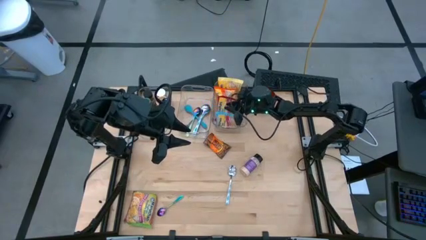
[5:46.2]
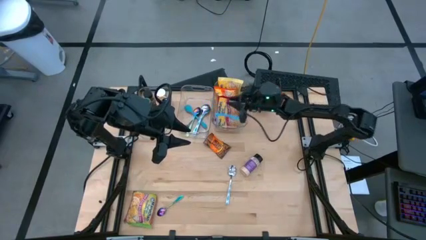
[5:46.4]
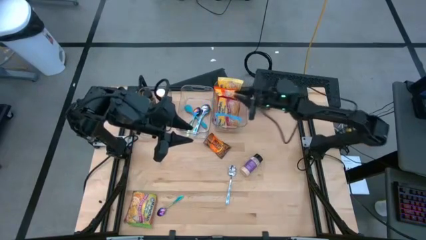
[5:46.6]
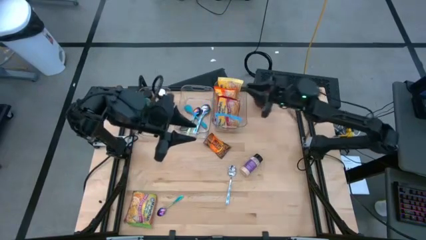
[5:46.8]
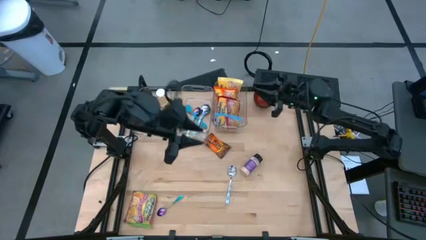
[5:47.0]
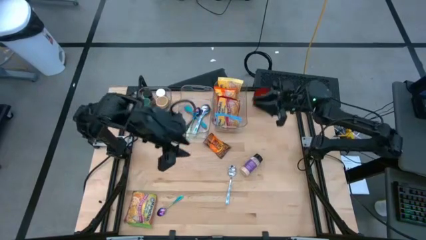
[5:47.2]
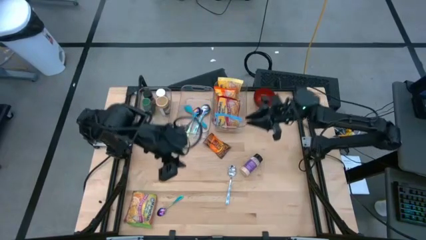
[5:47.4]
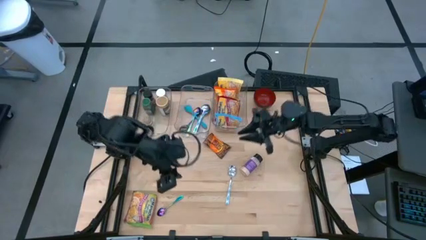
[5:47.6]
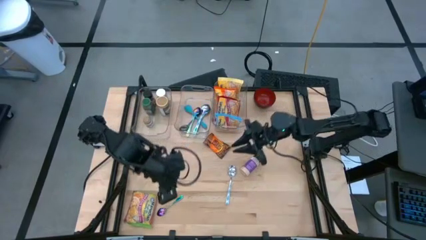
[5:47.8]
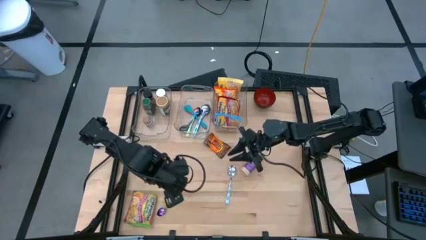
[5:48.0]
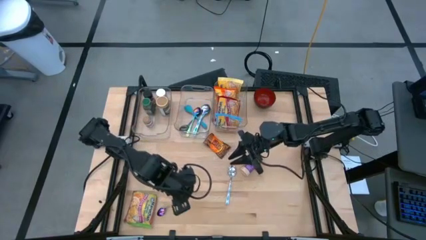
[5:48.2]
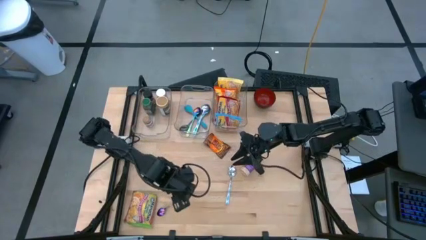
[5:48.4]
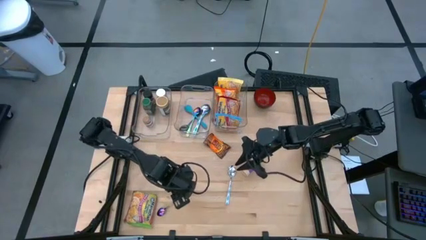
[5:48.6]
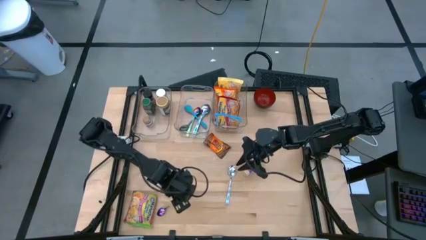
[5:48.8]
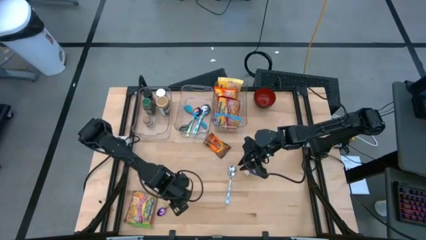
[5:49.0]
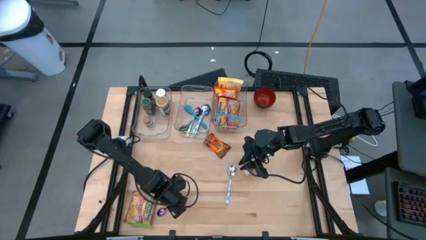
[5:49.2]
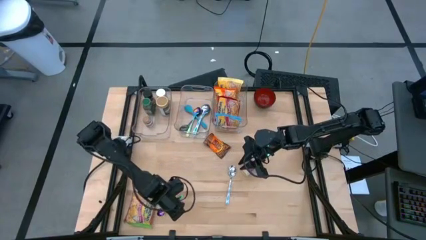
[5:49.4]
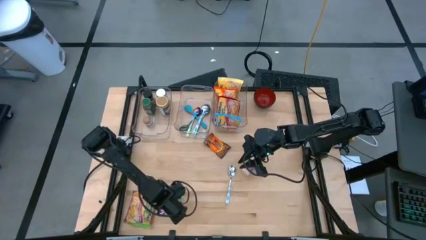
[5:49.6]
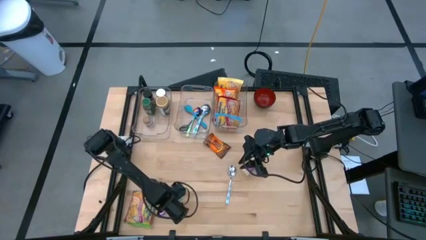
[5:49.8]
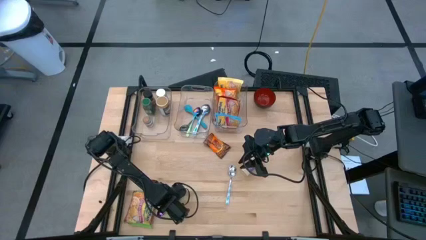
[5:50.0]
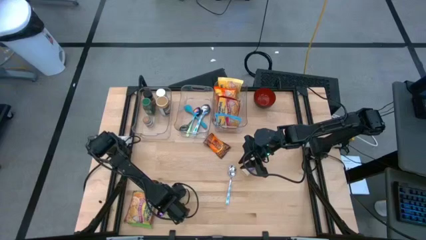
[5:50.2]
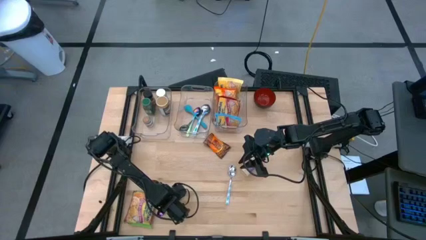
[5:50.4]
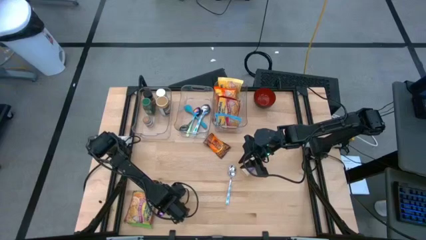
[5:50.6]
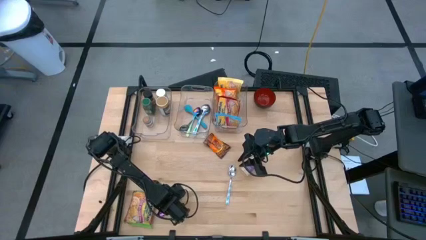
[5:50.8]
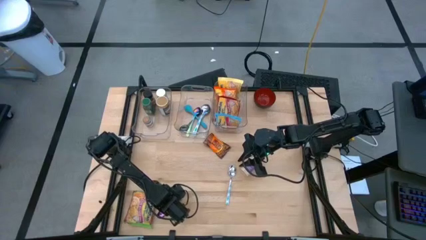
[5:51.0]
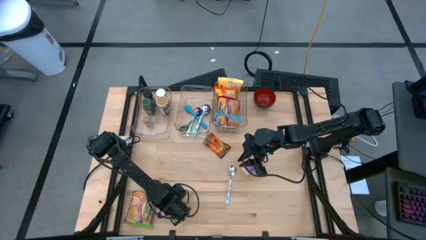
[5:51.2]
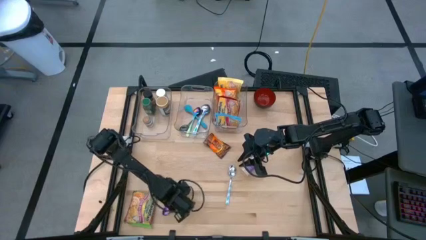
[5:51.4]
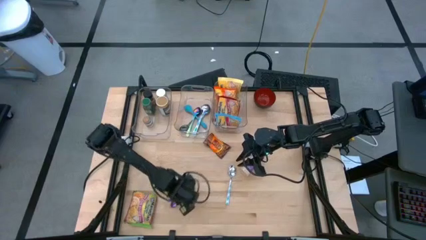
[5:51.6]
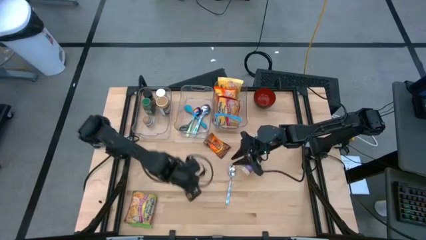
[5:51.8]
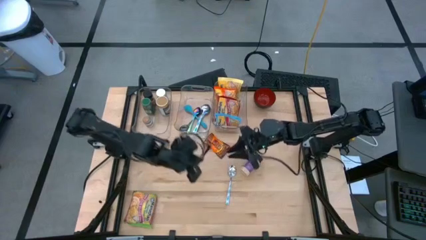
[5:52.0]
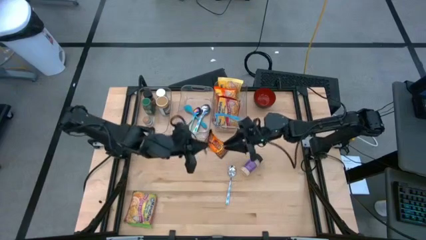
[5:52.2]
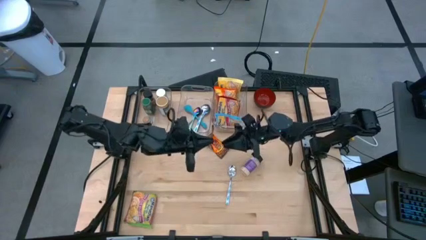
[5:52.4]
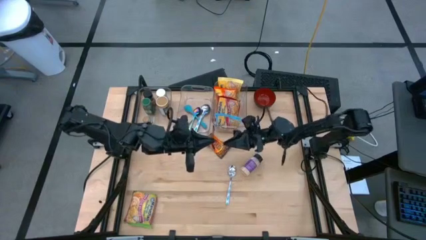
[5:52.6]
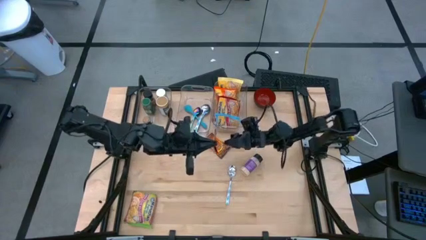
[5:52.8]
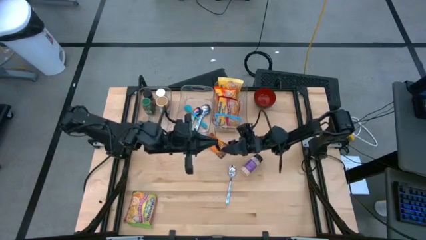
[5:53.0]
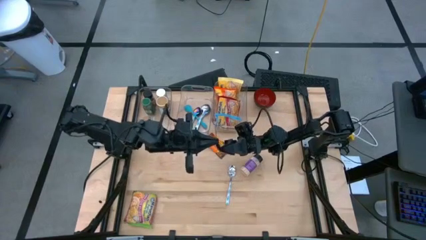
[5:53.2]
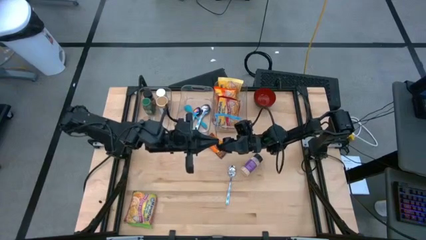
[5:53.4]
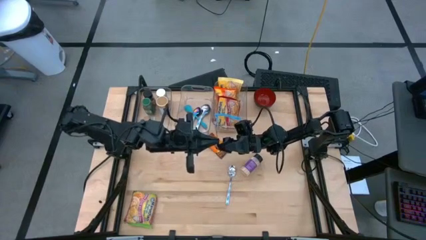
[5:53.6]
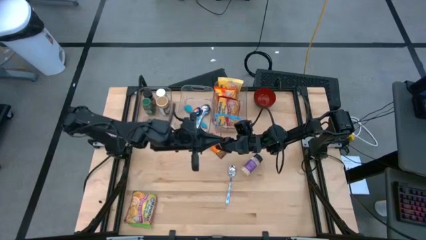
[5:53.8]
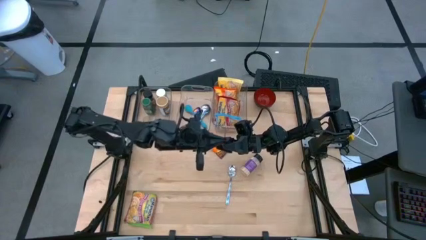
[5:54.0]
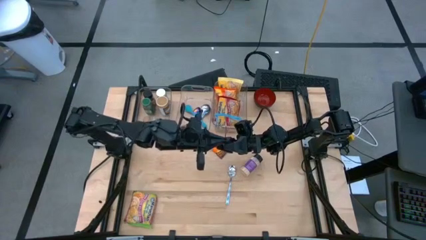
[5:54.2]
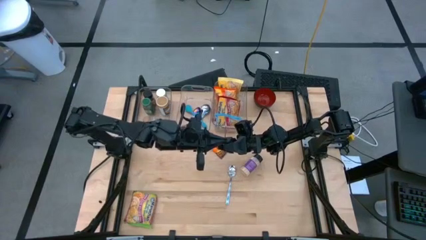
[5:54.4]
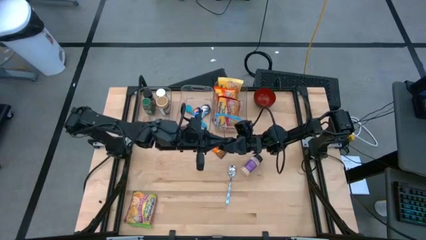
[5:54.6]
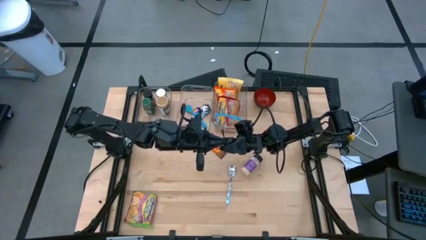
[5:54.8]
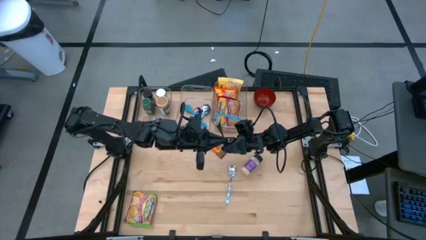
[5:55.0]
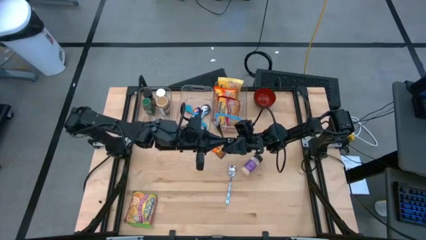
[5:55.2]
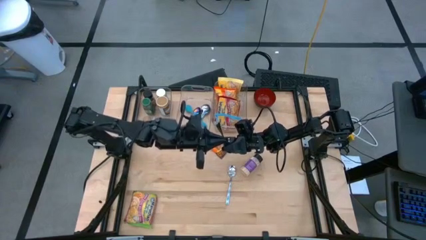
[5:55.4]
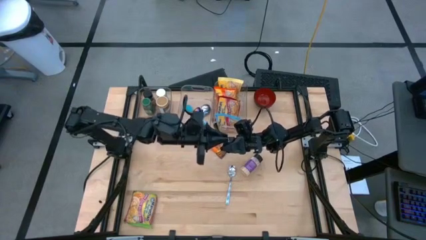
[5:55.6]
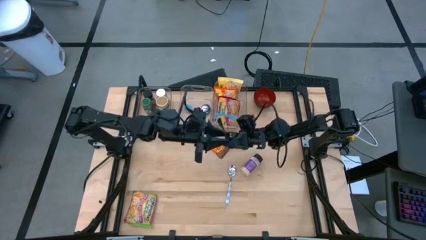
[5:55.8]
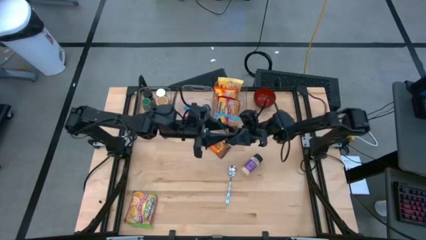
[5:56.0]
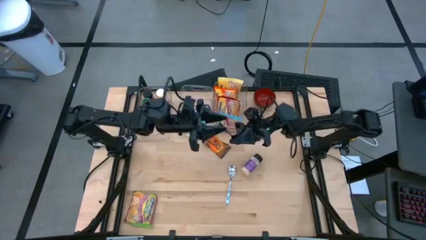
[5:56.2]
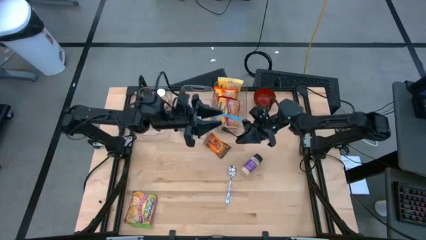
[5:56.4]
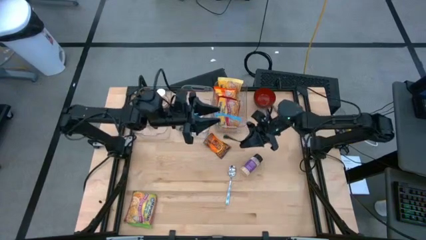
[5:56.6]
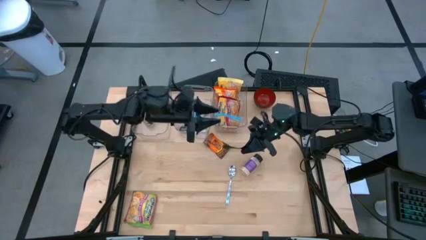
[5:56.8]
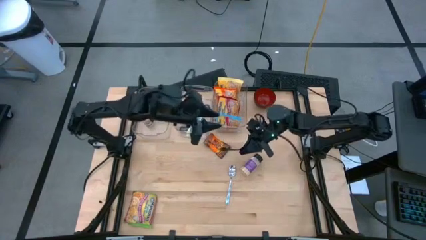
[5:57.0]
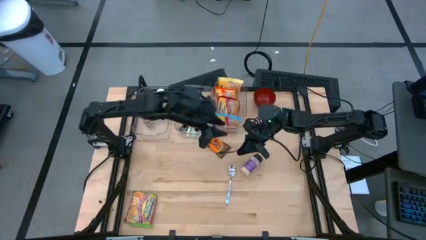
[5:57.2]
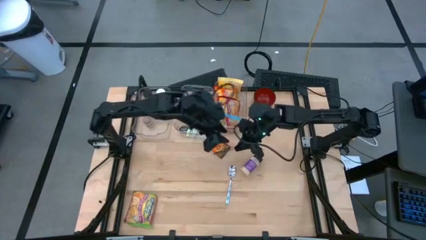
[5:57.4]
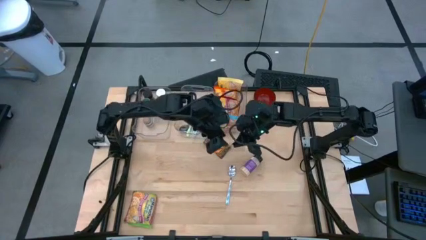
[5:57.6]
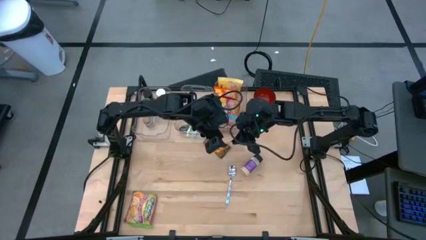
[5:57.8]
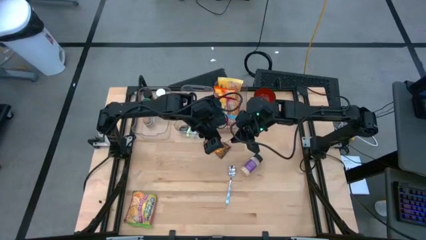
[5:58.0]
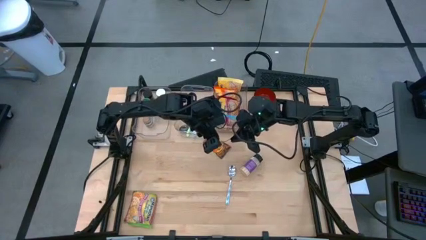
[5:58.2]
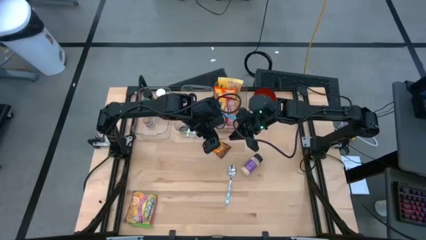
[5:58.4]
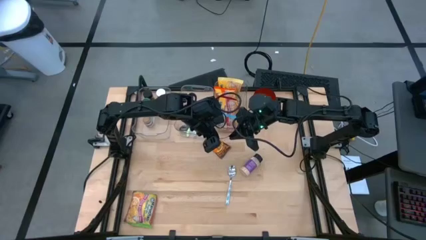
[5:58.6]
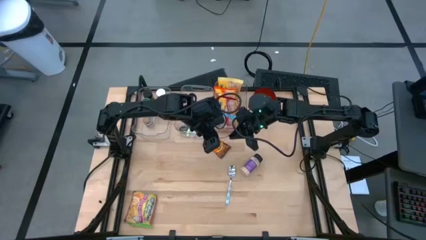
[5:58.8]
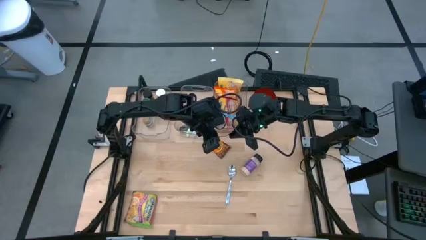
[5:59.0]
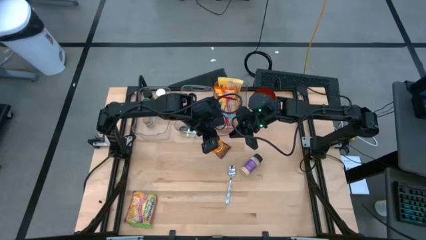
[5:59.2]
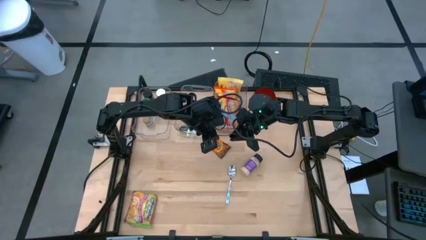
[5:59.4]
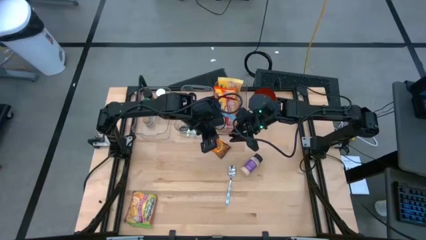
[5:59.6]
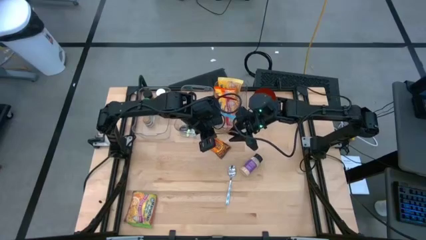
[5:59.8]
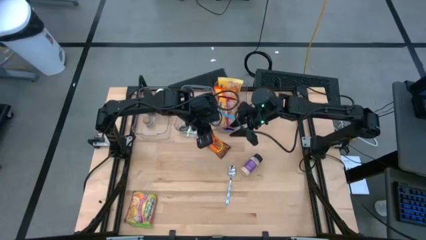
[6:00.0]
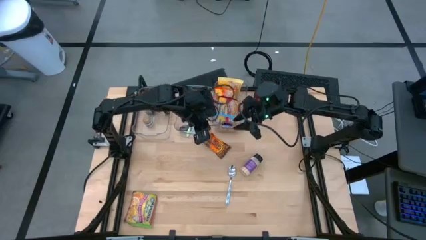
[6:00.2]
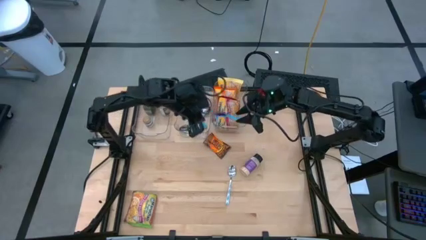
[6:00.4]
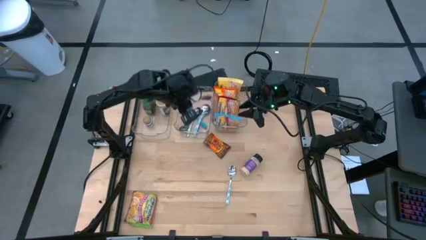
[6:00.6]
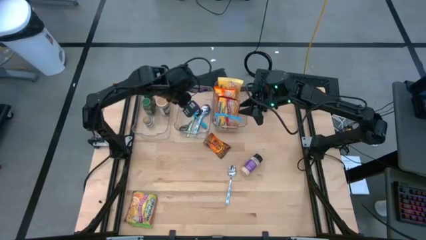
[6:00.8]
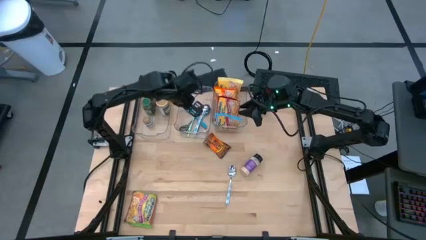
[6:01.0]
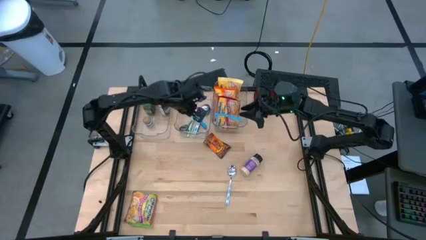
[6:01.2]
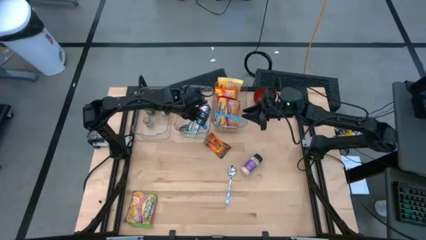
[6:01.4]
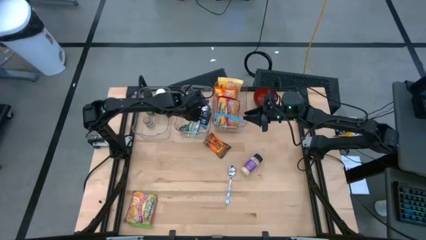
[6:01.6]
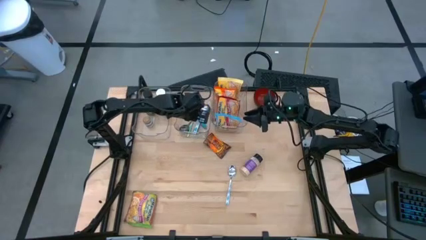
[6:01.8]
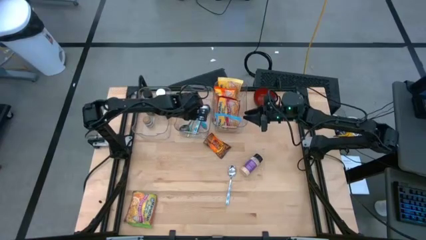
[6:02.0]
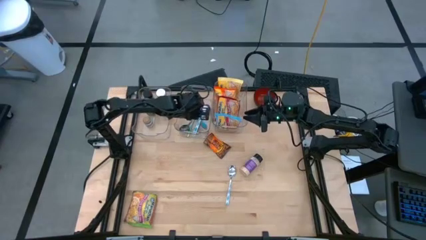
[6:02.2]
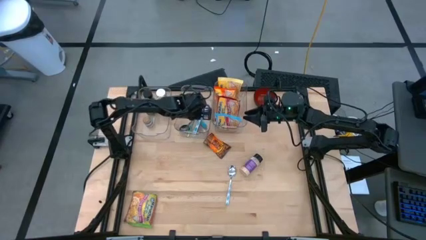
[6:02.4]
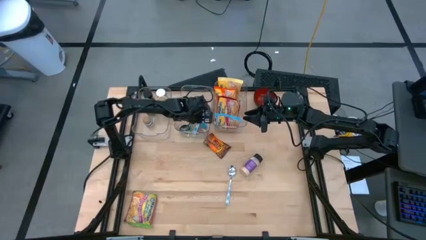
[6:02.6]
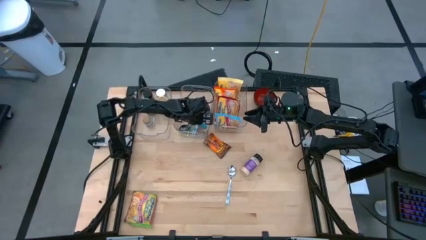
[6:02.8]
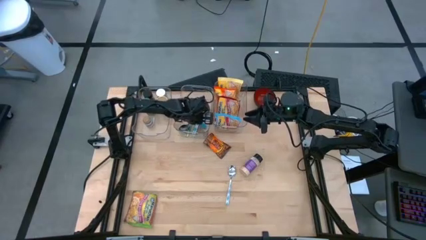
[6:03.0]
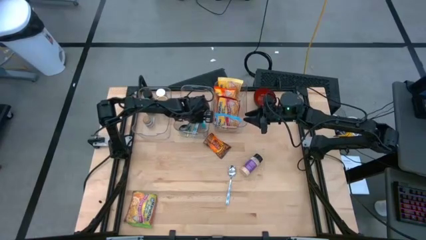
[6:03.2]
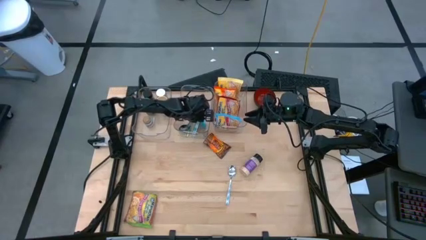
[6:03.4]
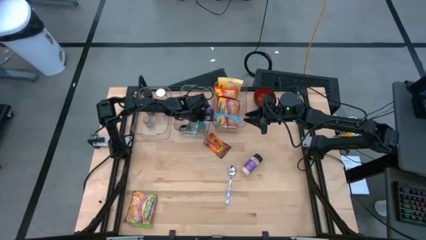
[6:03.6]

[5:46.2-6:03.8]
Task: Pick & Place Food Item
Put the purple and blue spoon into the middle transparent bin
